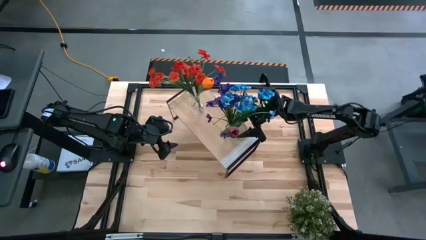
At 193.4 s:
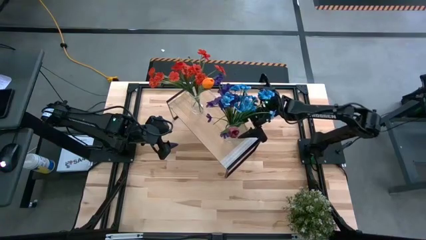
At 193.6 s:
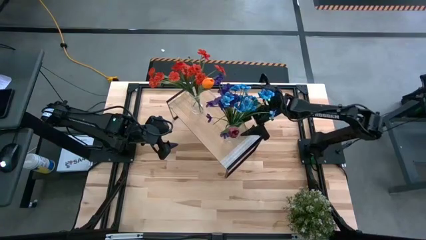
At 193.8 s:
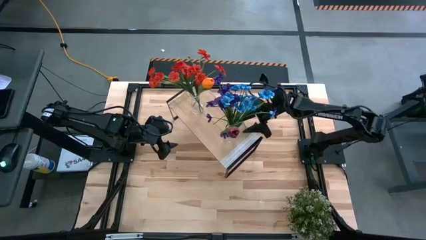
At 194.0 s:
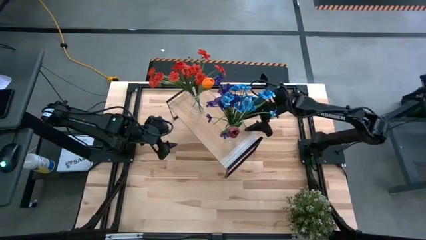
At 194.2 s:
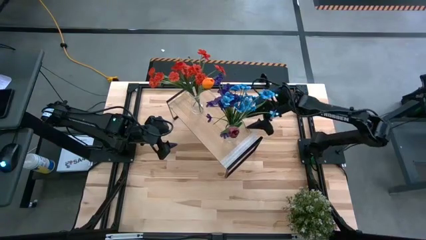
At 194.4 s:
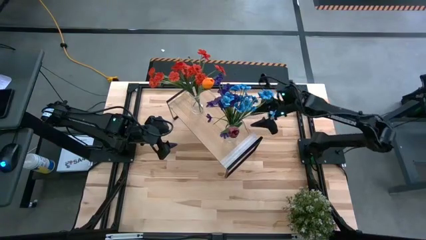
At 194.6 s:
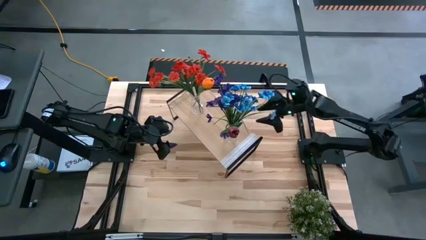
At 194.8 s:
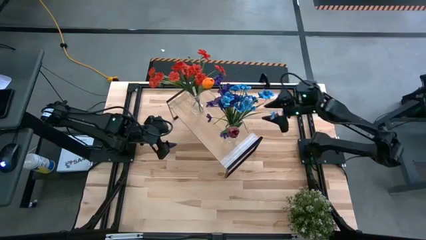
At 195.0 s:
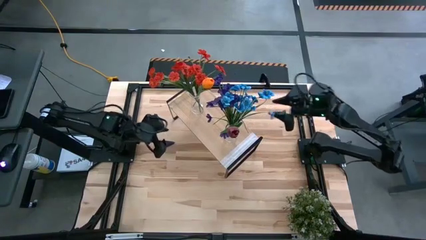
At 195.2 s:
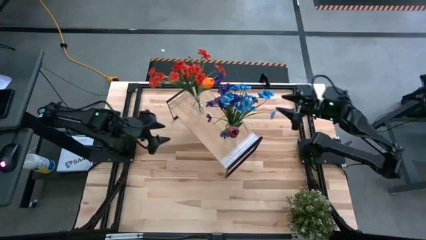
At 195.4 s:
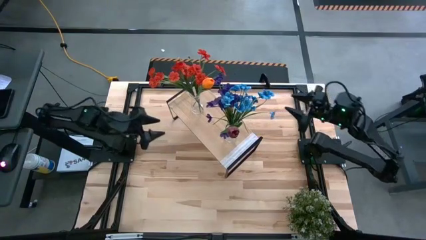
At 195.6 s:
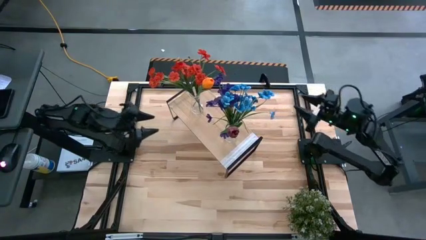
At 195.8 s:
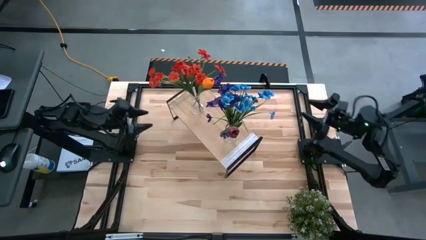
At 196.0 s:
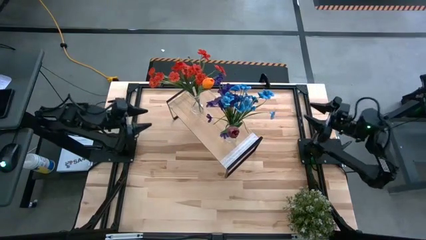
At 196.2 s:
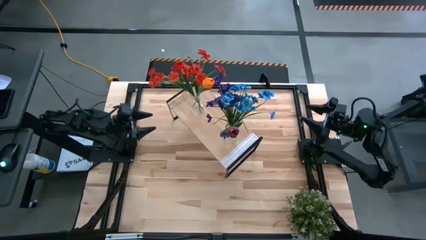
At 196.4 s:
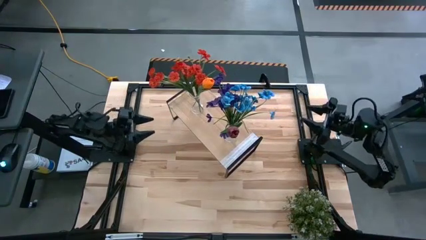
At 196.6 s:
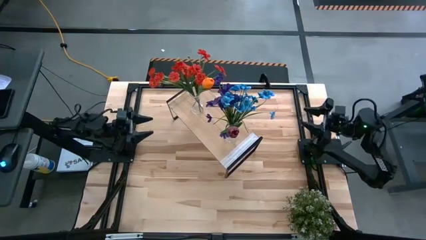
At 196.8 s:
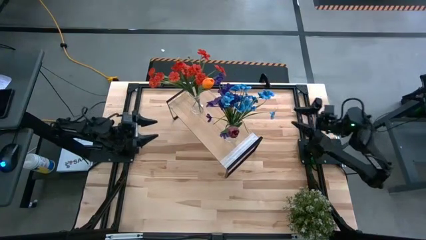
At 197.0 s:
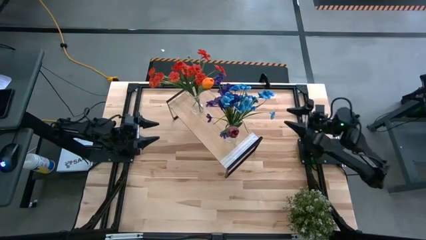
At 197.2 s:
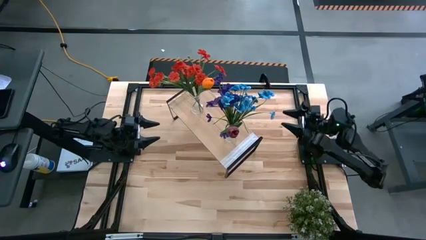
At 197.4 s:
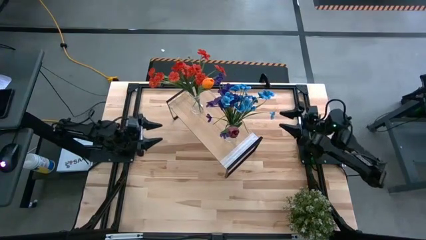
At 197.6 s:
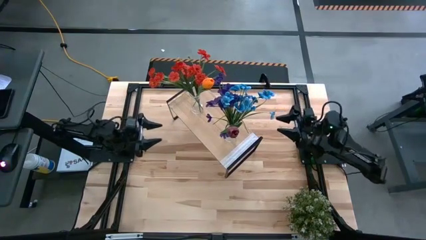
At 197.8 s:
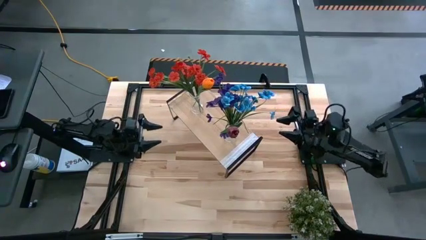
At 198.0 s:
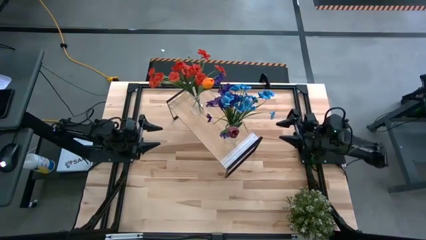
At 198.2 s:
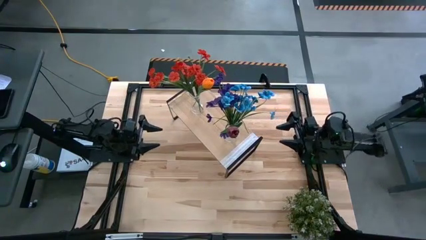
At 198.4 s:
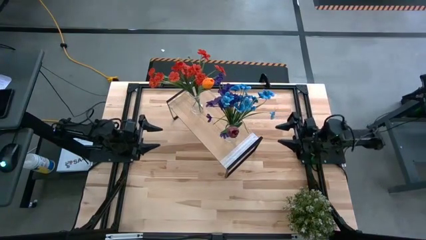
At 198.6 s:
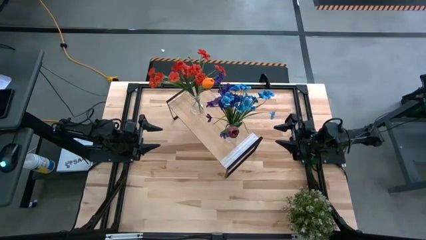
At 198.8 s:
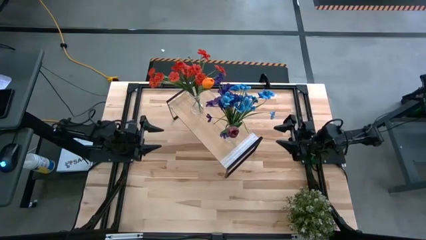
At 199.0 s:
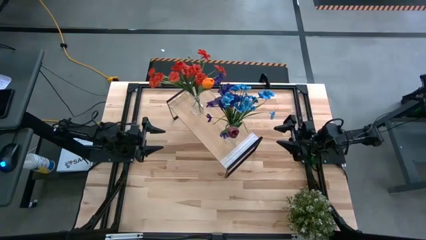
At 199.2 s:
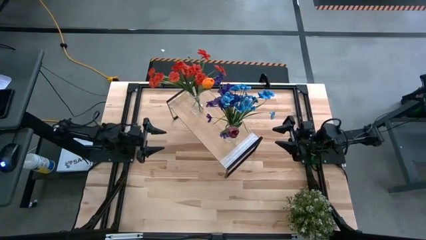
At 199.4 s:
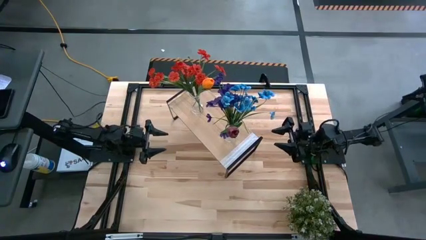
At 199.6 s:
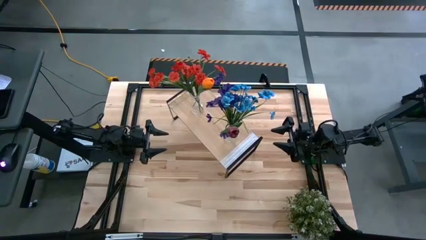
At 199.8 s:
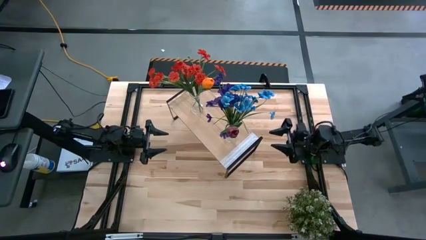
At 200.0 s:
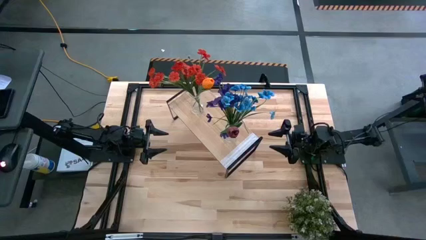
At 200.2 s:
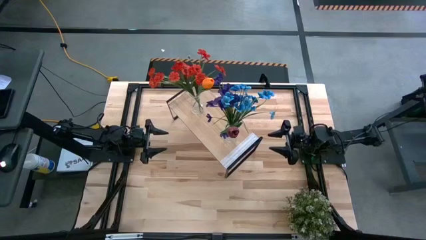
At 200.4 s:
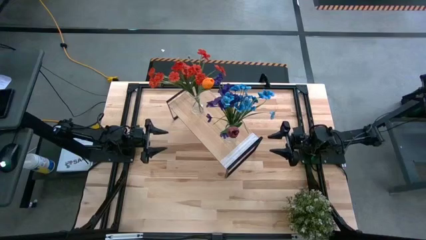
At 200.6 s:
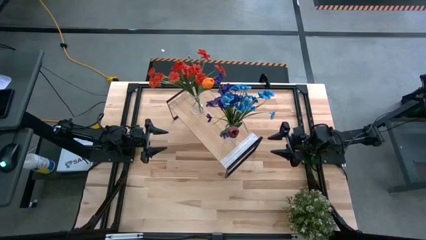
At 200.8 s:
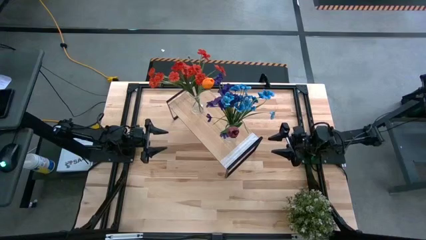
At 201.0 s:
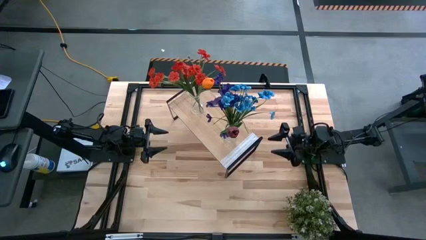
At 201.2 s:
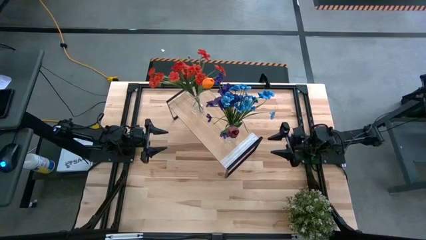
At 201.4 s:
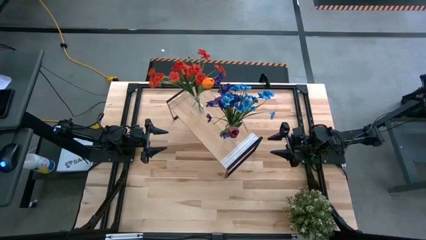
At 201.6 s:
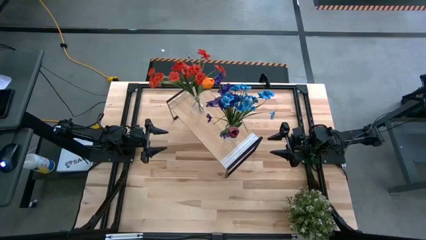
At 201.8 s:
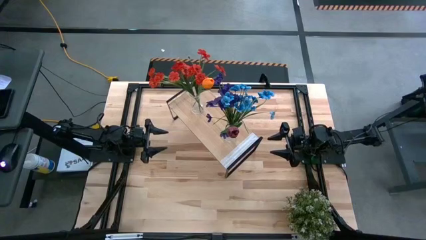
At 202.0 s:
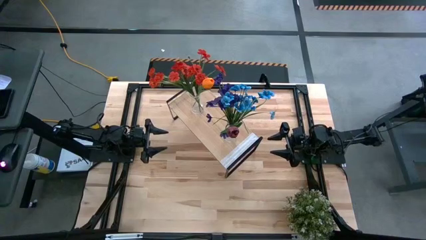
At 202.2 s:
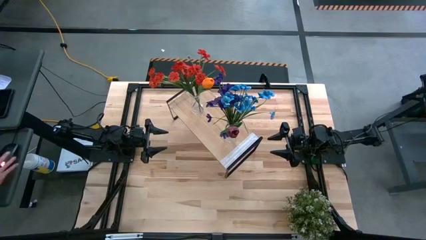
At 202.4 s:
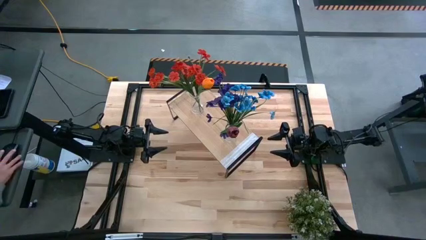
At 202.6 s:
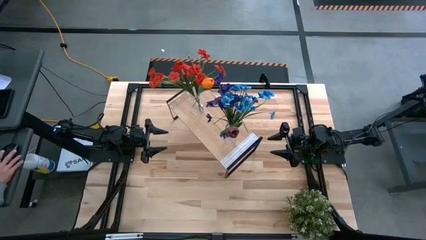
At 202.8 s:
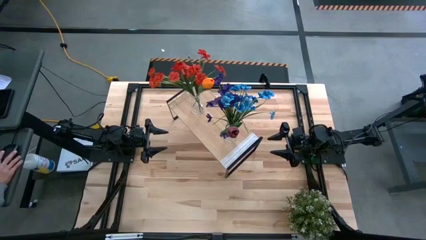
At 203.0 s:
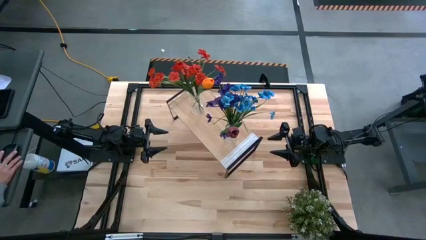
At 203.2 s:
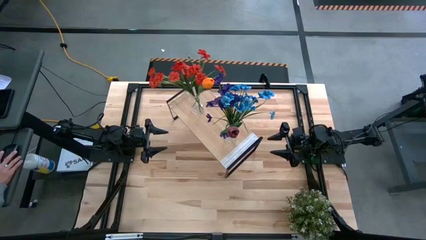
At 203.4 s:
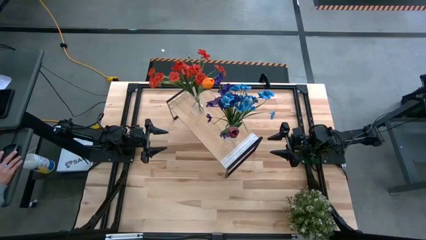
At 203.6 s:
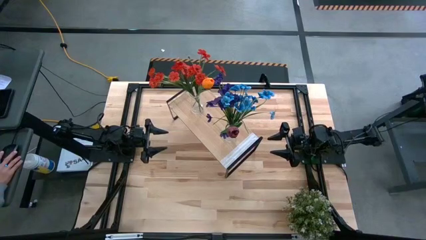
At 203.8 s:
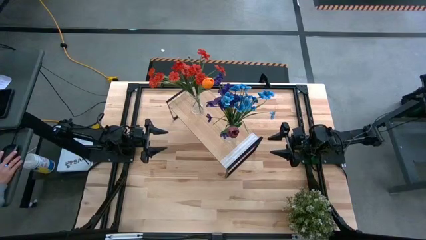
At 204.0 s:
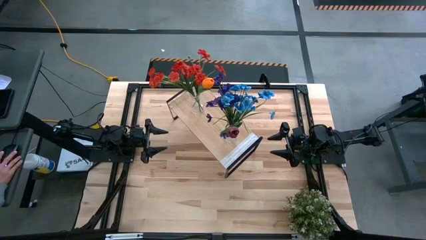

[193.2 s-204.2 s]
Task: Pick and place flowers into a vace then onto a shelf
Return to Home Position
